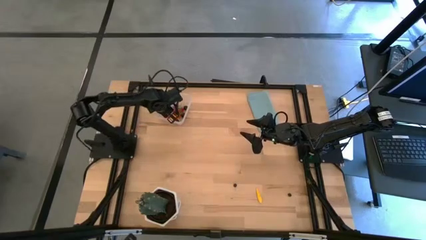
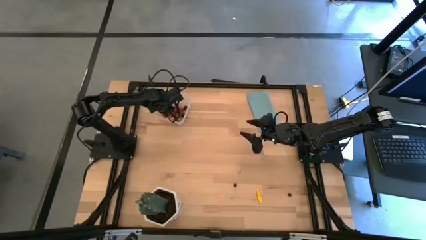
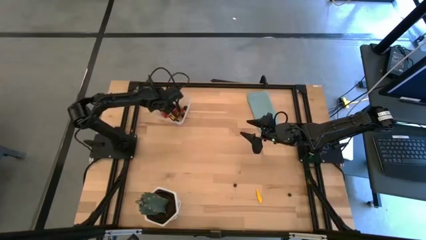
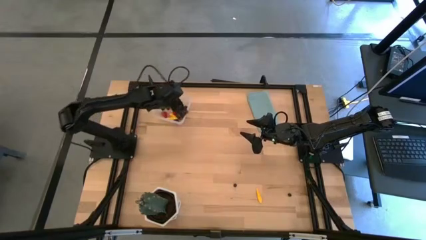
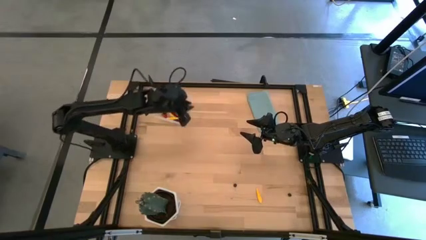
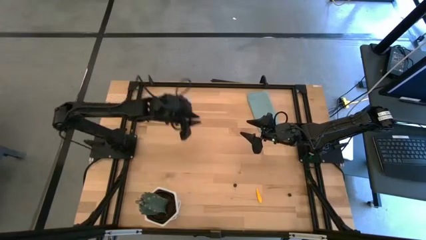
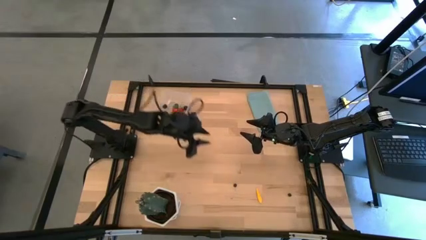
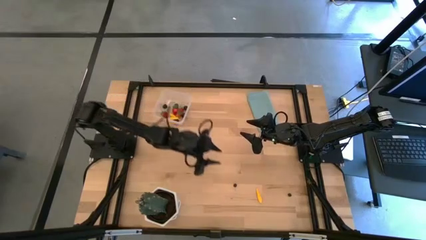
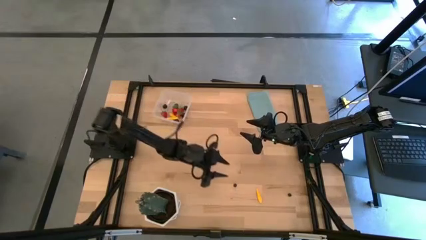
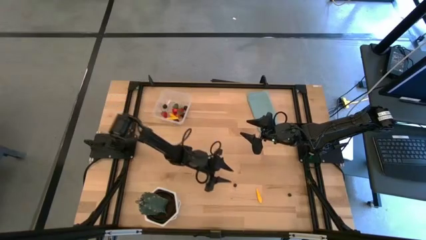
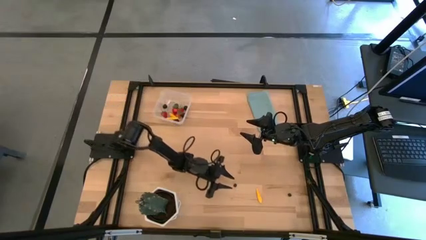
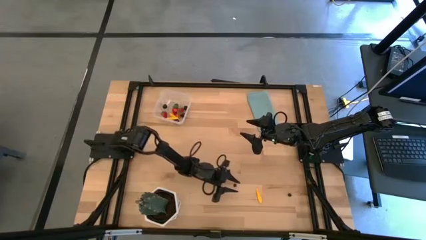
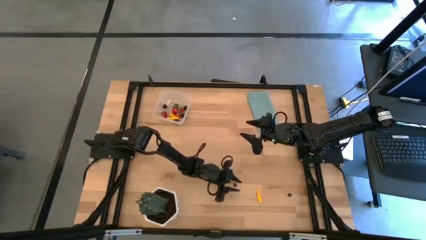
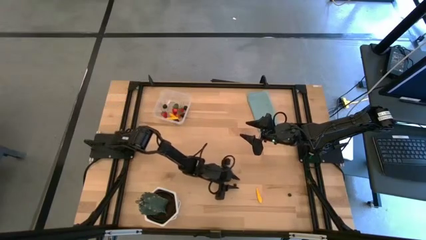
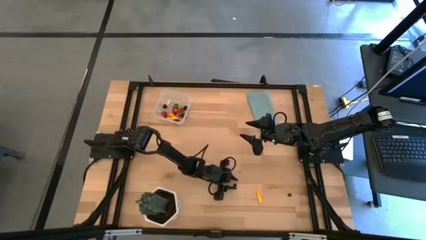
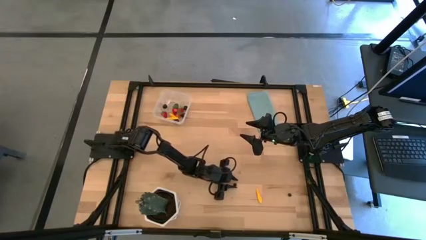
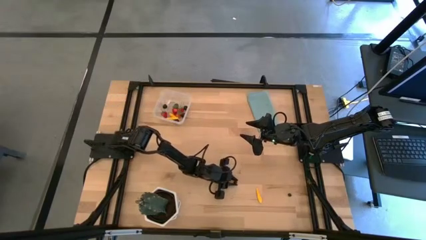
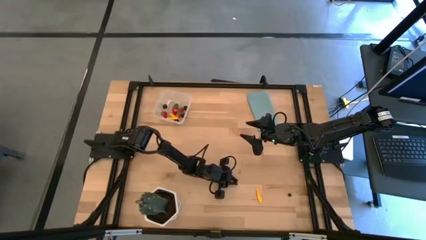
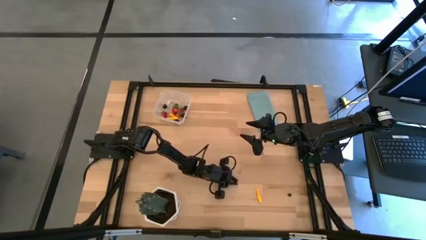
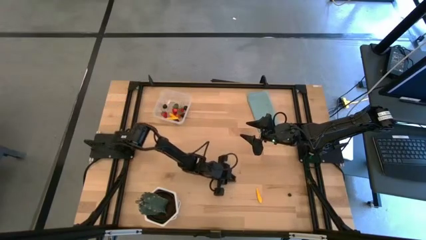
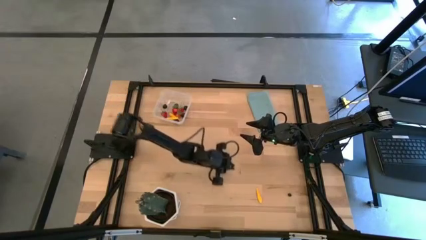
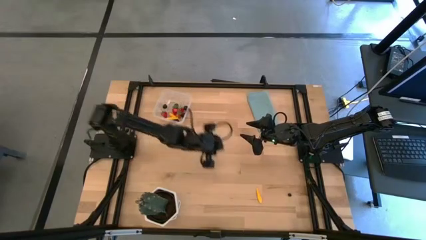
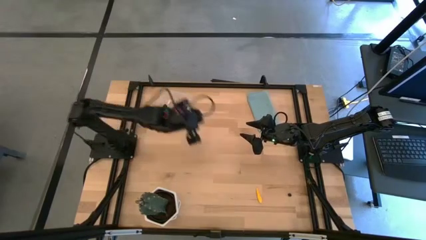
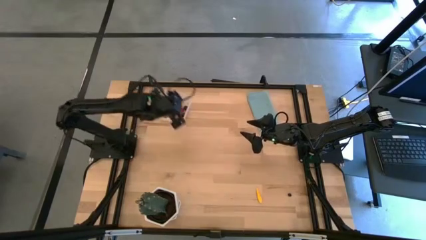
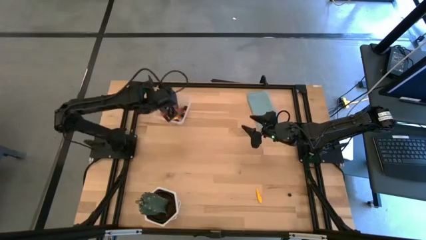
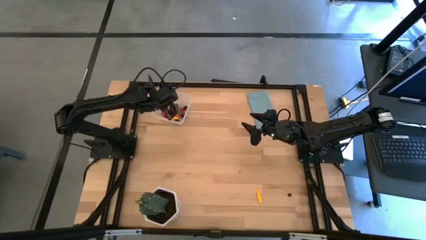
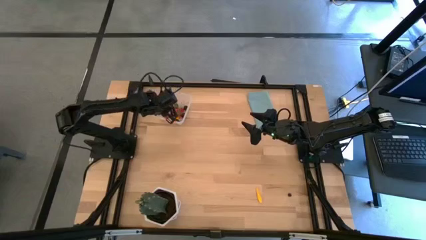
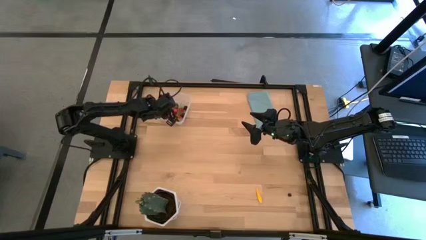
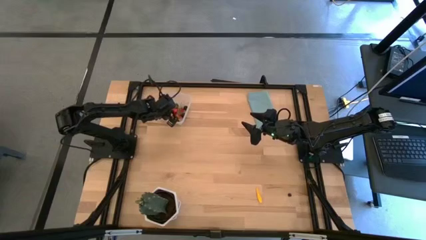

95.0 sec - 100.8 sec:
Task: Pick and placing Produce into tupperware
Put the blueberry into the transparent bin

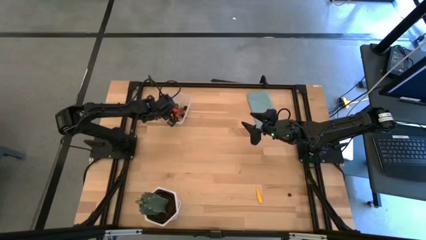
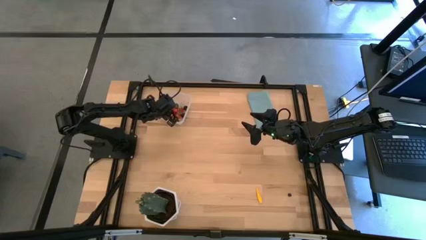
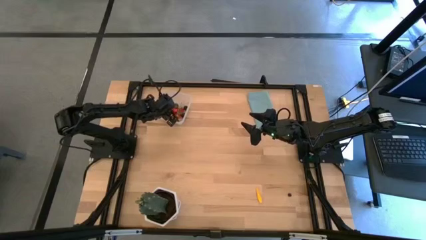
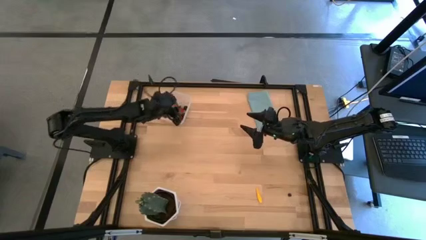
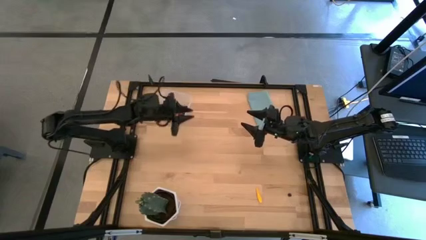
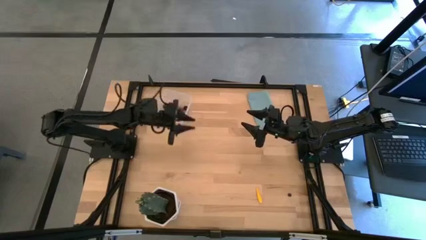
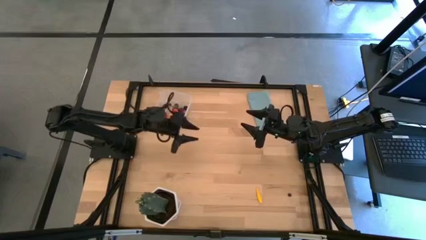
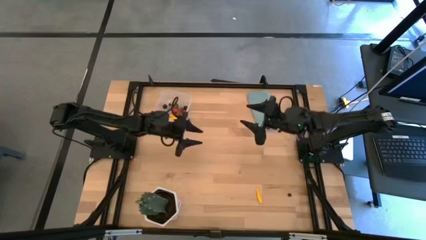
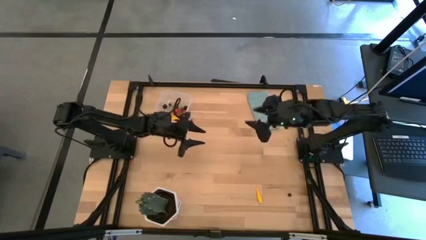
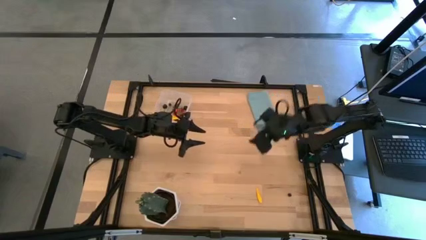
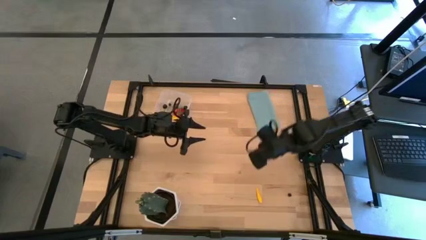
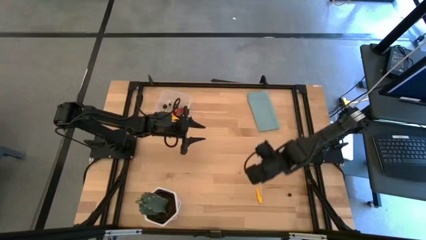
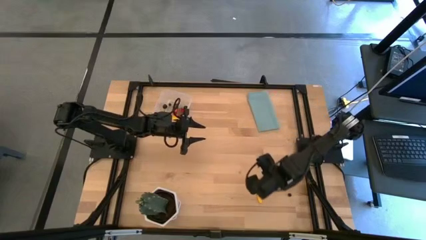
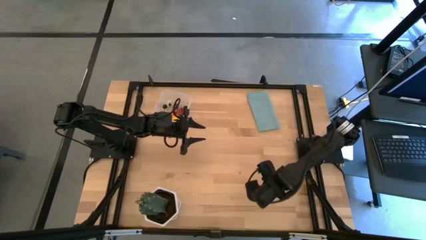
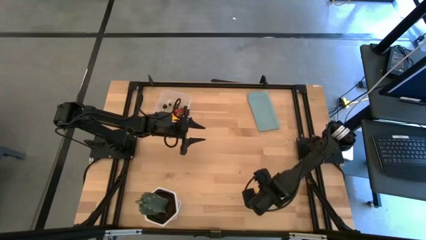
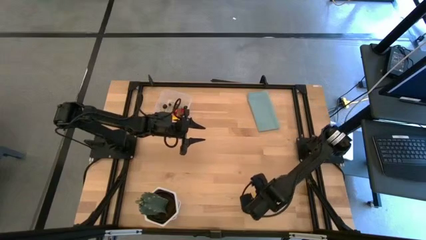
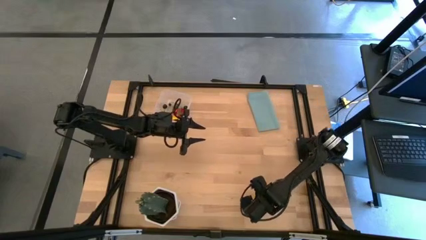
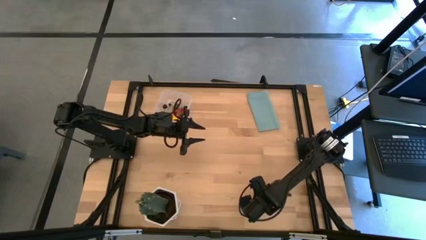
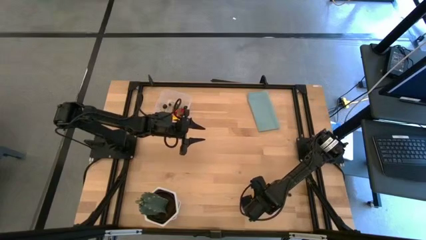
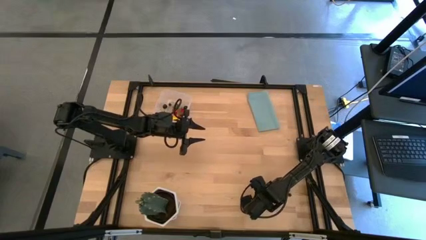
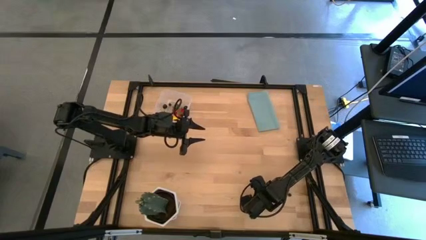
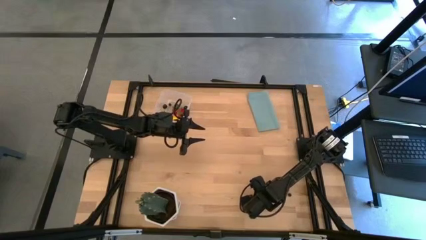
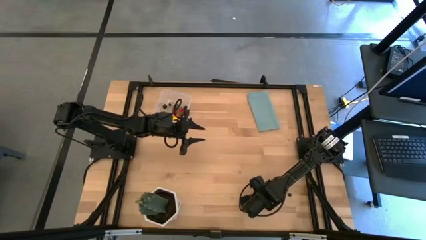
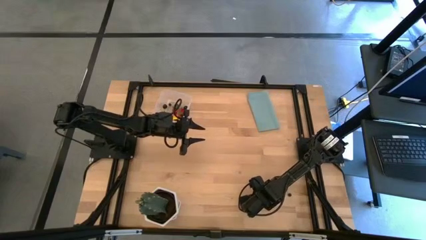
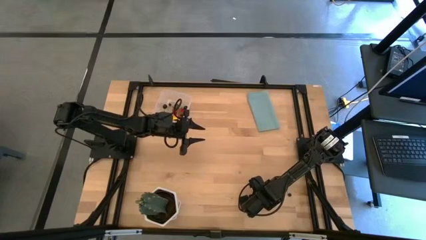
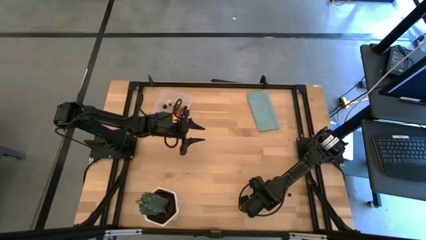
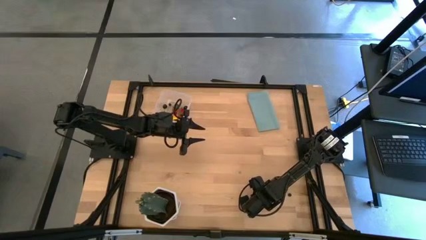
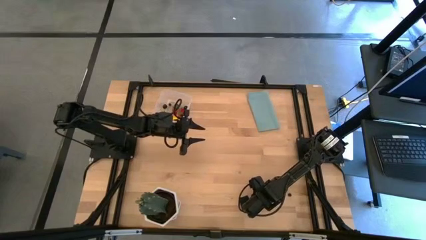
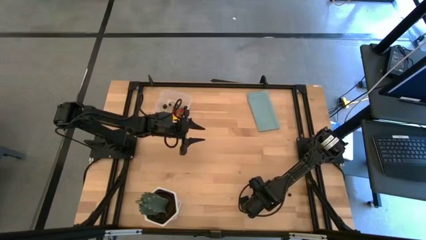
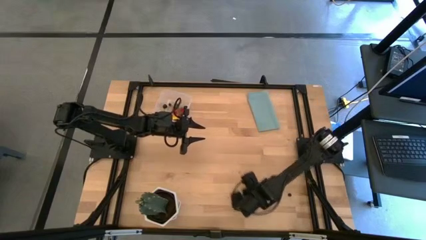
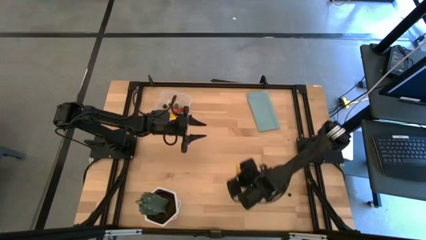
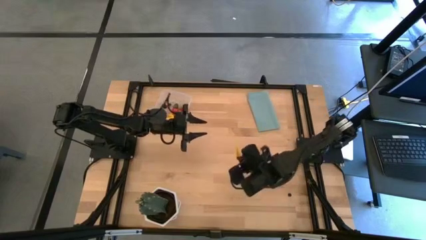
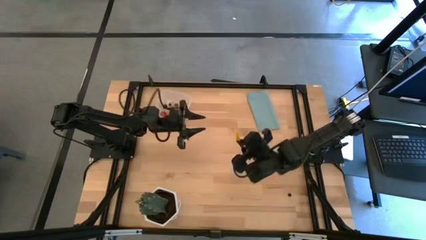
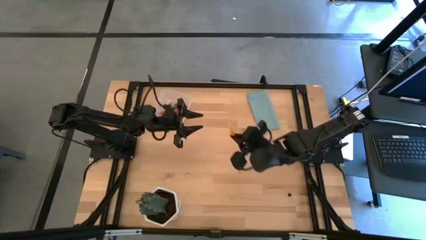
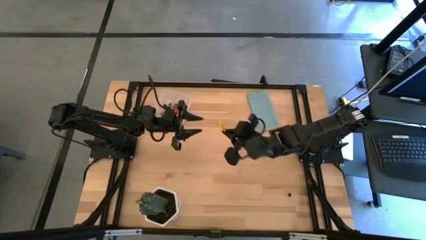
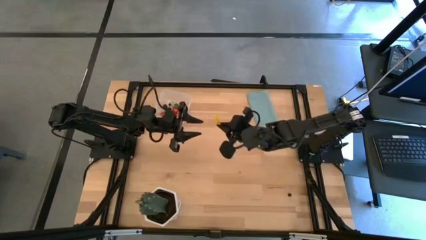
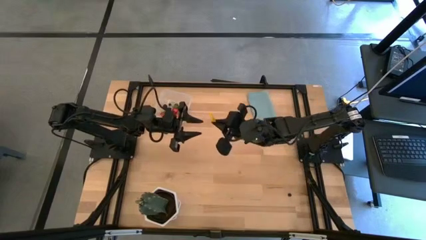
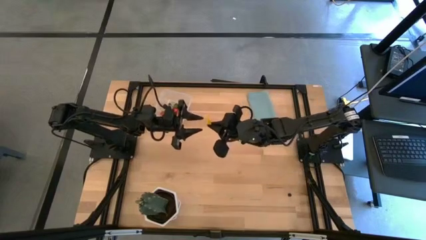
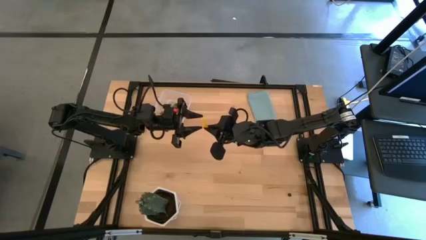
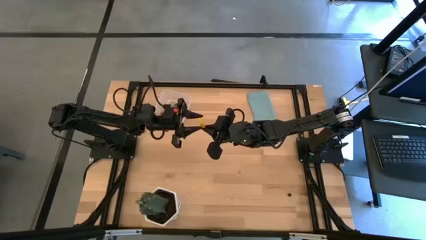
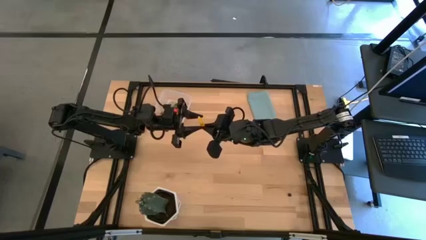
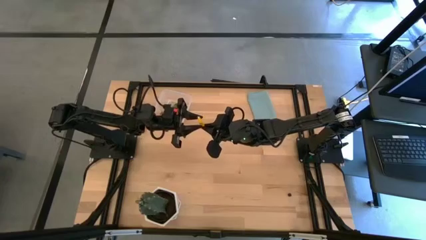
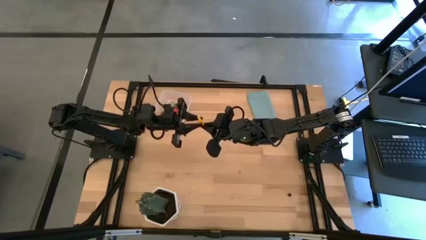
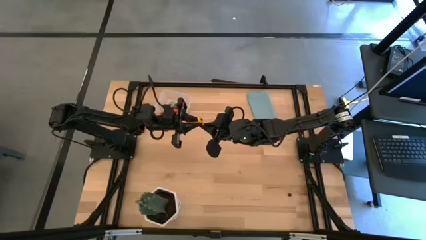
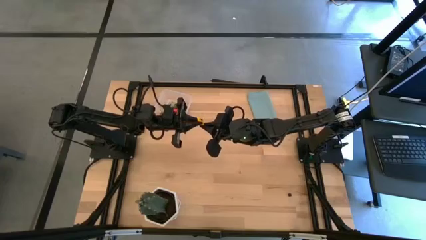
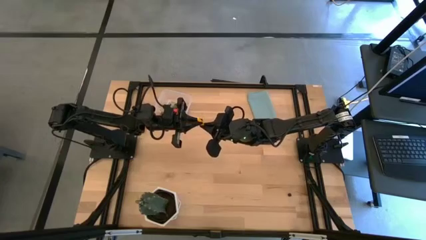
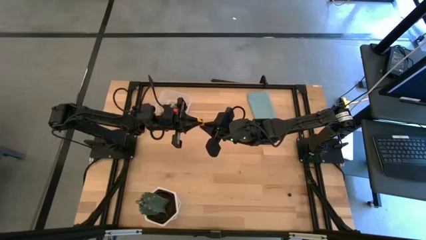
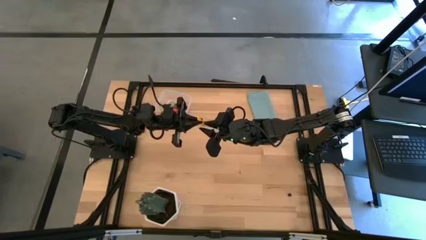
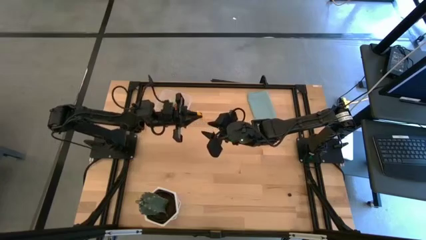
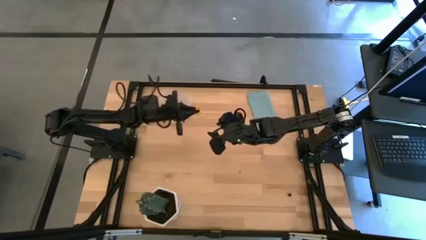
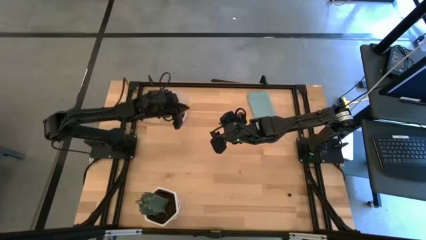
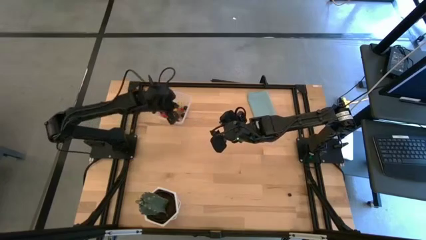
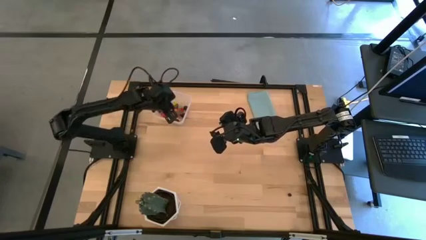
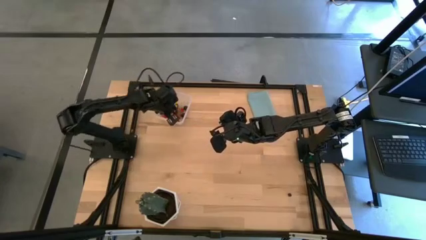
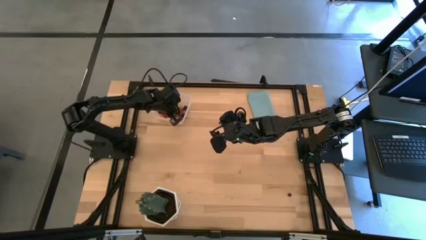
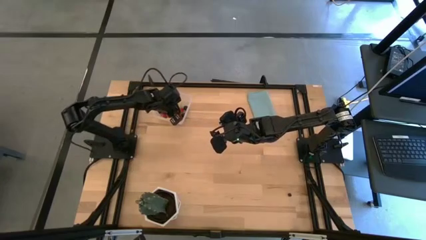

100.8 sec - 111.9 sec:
Put the yellow corn into the transparent bin
